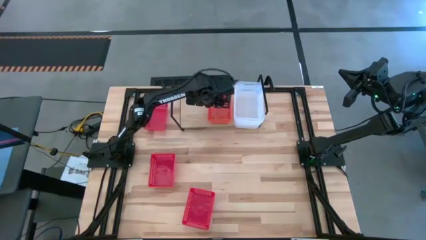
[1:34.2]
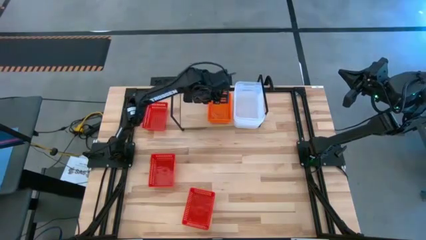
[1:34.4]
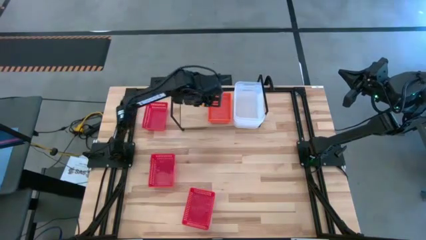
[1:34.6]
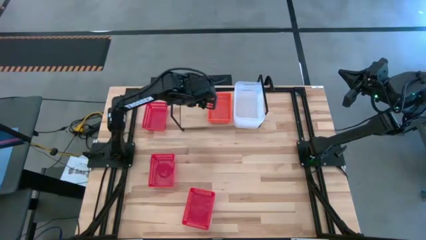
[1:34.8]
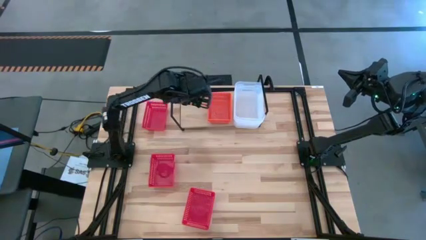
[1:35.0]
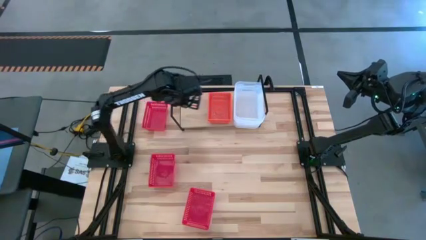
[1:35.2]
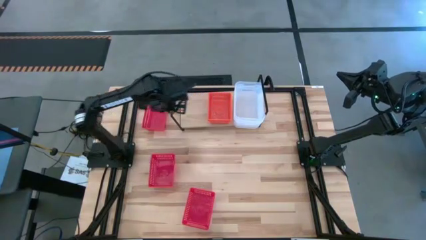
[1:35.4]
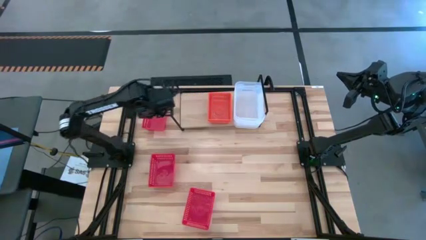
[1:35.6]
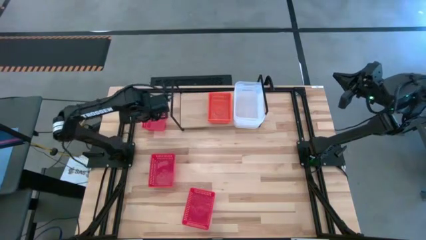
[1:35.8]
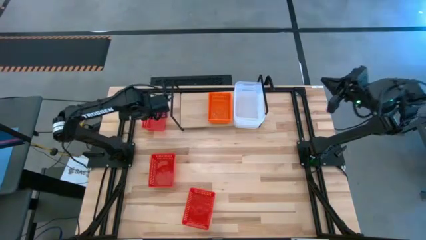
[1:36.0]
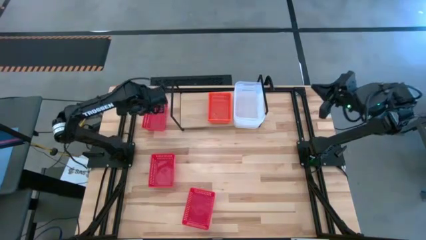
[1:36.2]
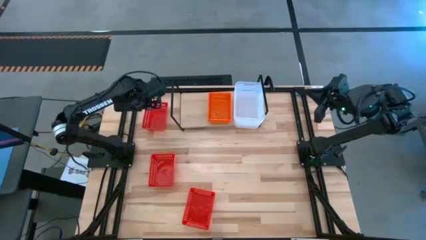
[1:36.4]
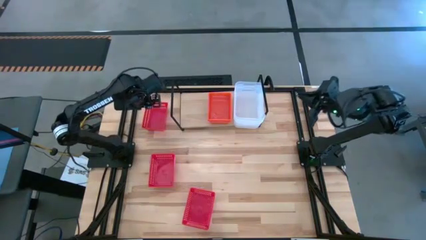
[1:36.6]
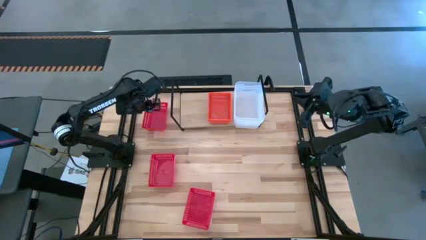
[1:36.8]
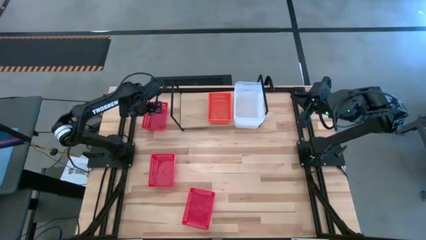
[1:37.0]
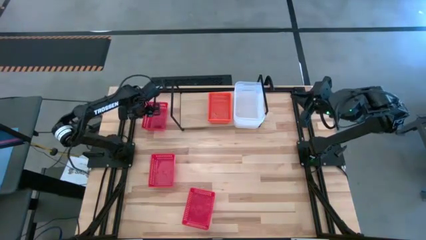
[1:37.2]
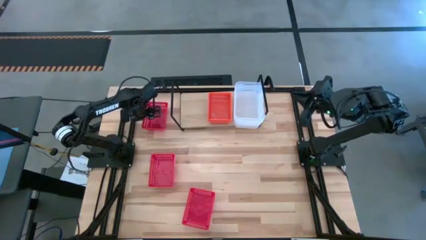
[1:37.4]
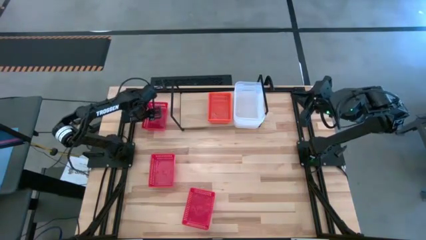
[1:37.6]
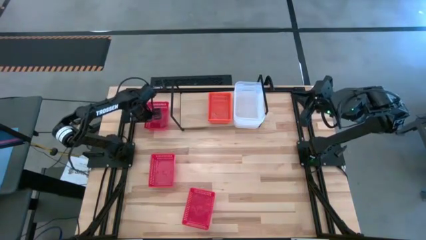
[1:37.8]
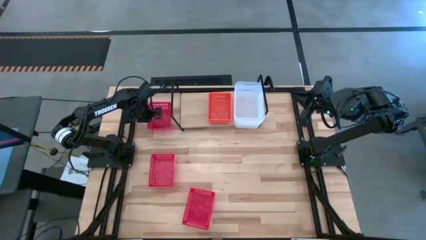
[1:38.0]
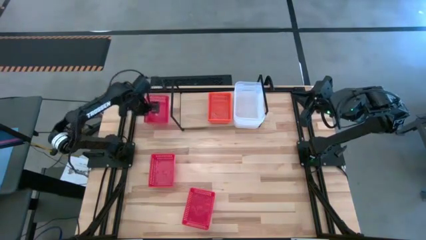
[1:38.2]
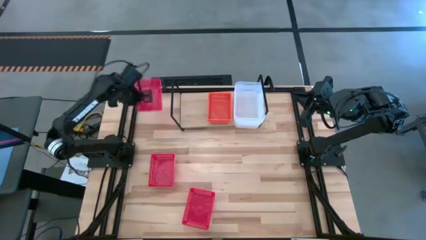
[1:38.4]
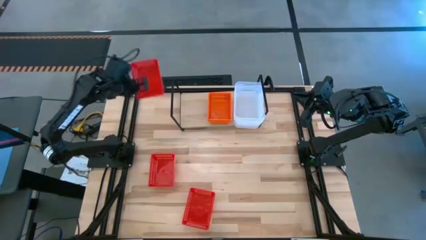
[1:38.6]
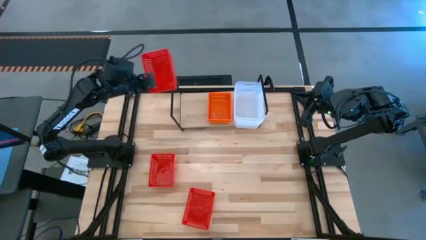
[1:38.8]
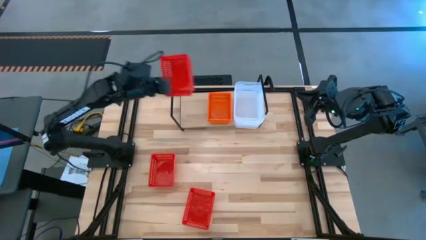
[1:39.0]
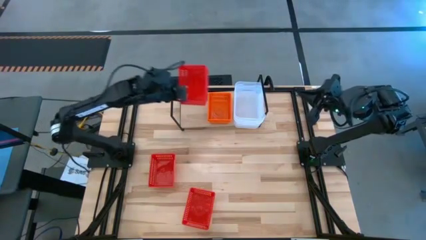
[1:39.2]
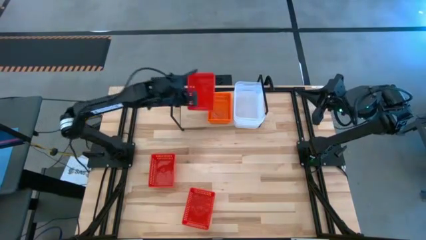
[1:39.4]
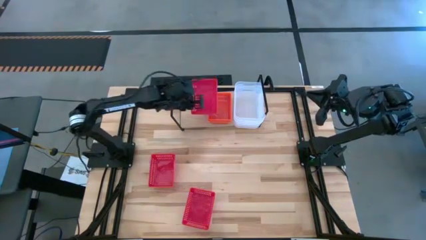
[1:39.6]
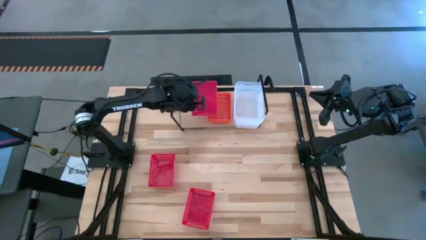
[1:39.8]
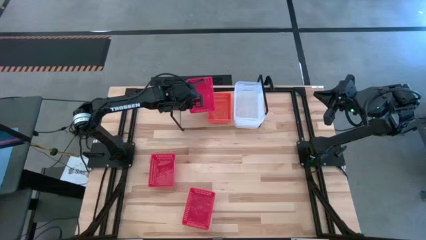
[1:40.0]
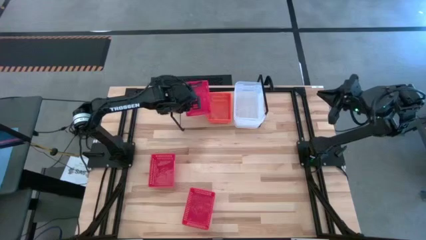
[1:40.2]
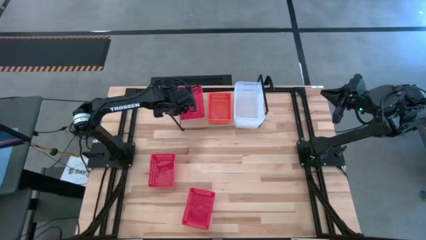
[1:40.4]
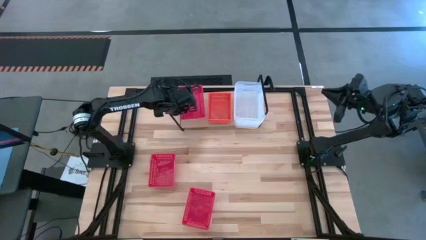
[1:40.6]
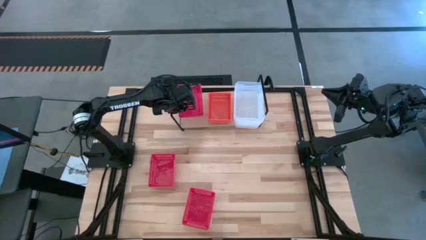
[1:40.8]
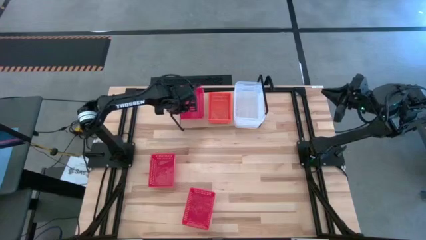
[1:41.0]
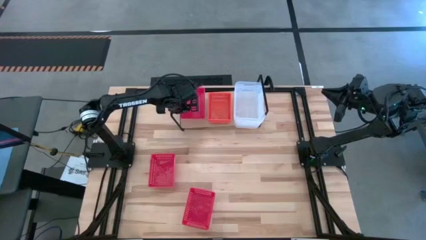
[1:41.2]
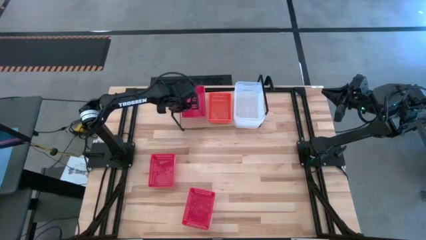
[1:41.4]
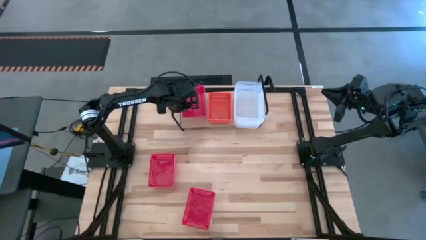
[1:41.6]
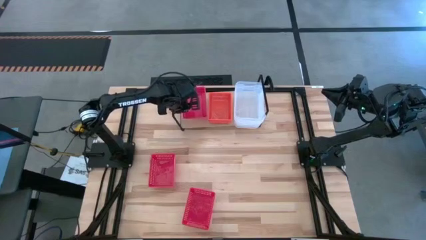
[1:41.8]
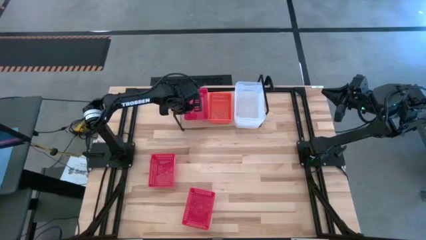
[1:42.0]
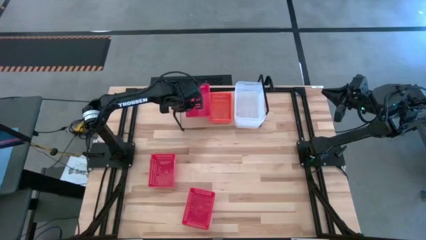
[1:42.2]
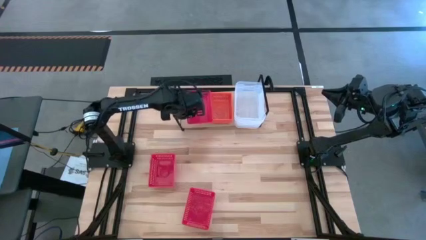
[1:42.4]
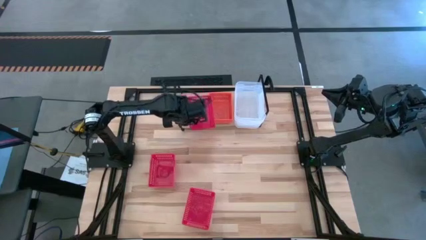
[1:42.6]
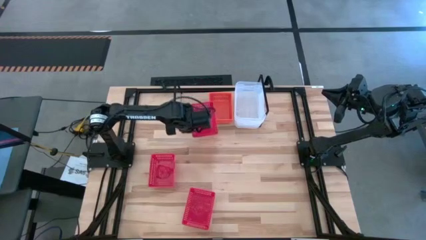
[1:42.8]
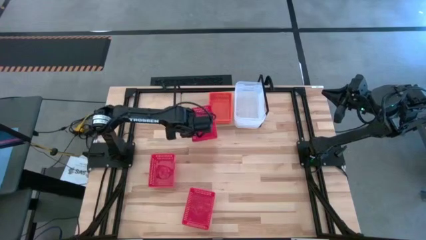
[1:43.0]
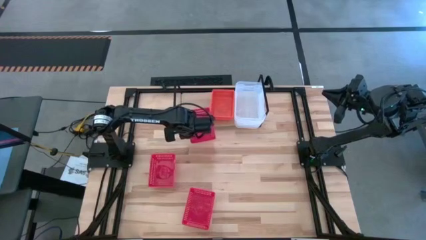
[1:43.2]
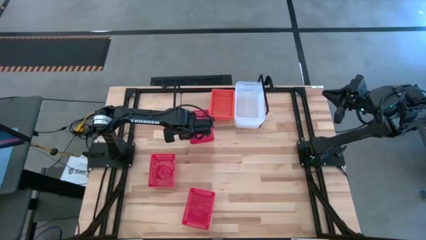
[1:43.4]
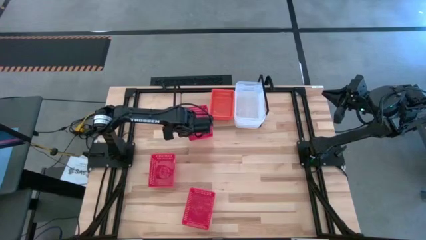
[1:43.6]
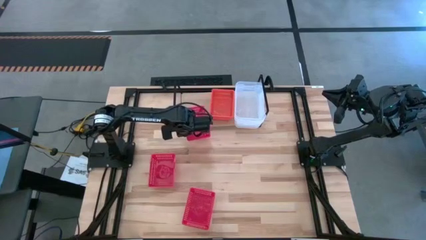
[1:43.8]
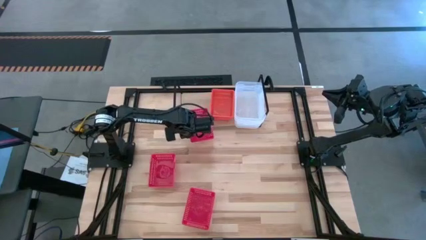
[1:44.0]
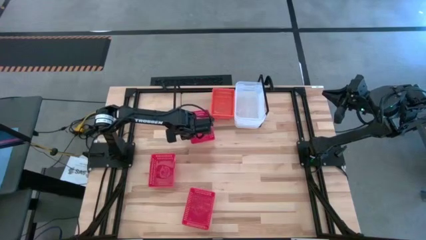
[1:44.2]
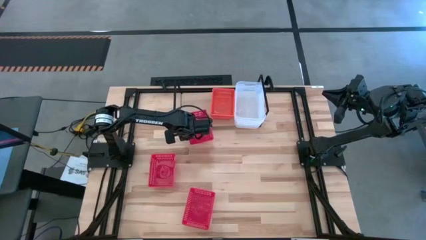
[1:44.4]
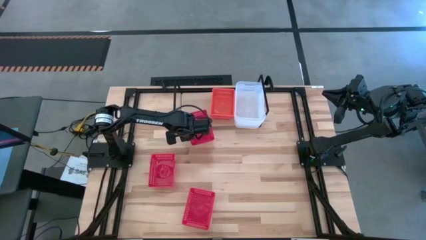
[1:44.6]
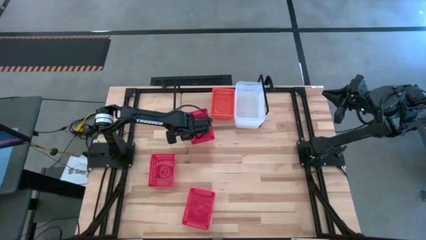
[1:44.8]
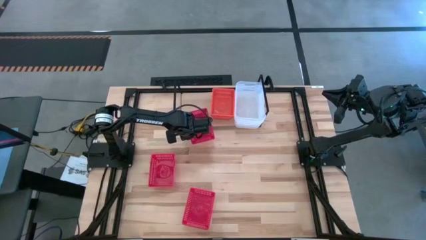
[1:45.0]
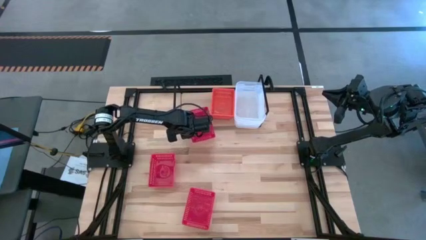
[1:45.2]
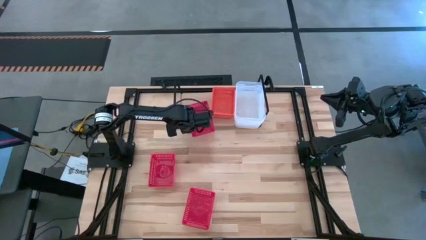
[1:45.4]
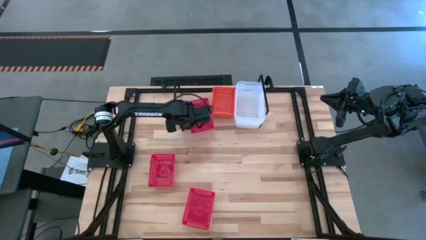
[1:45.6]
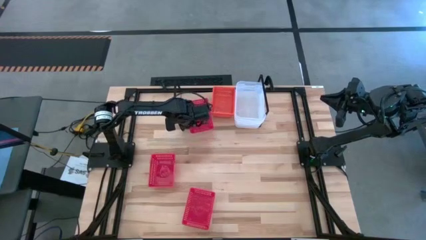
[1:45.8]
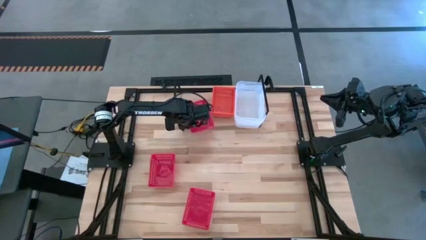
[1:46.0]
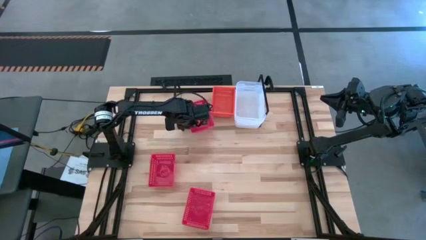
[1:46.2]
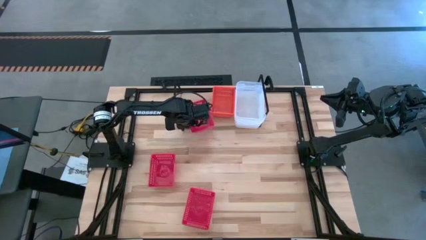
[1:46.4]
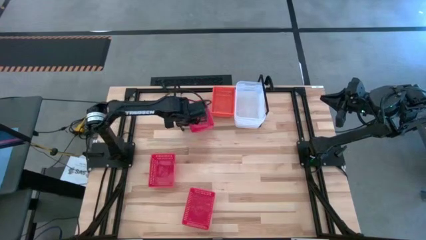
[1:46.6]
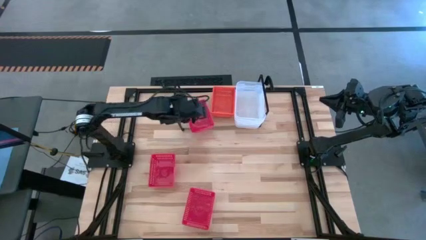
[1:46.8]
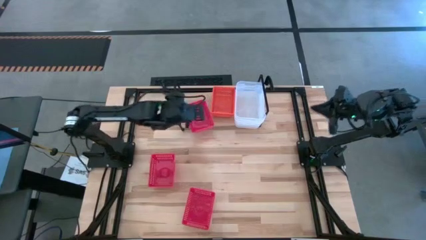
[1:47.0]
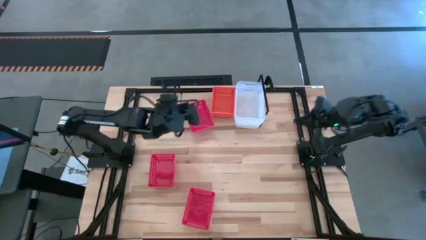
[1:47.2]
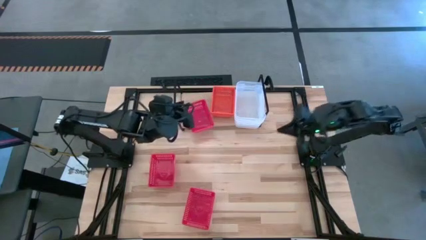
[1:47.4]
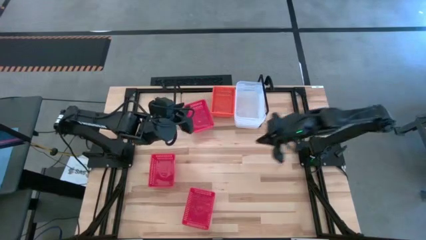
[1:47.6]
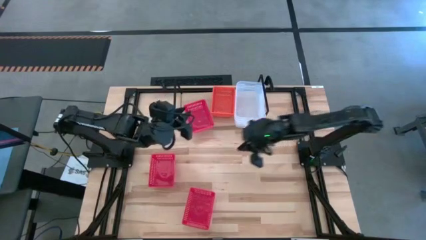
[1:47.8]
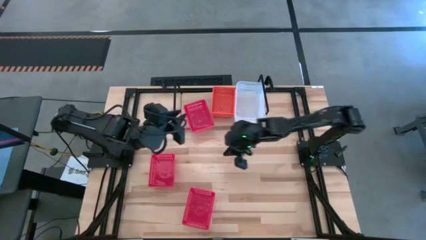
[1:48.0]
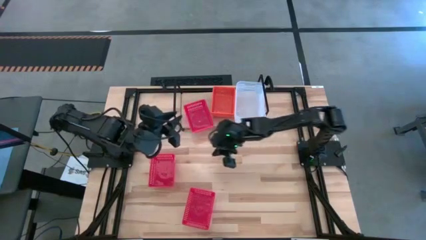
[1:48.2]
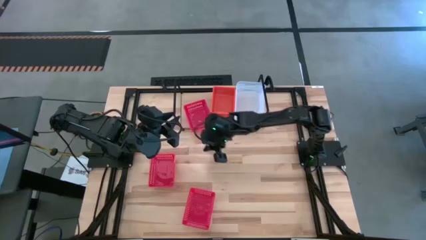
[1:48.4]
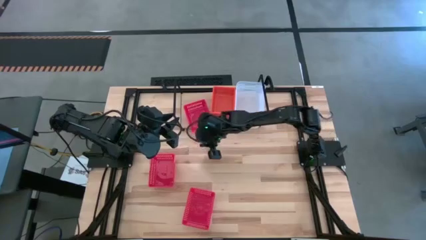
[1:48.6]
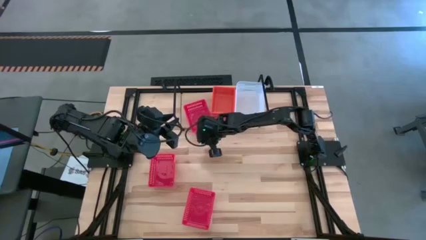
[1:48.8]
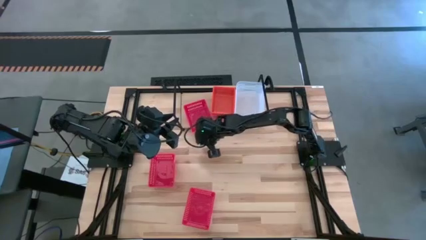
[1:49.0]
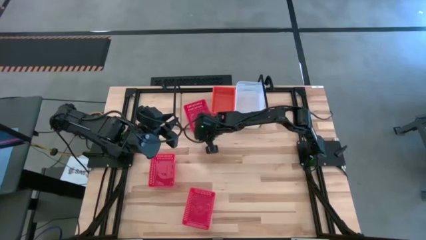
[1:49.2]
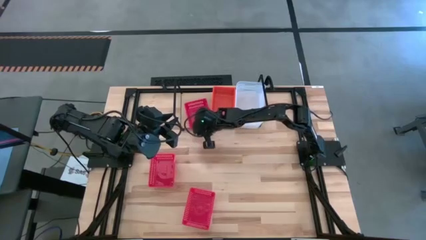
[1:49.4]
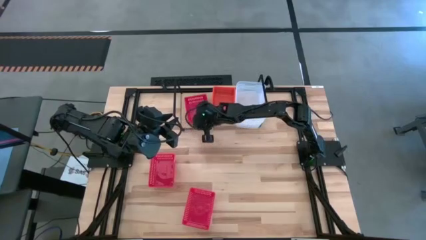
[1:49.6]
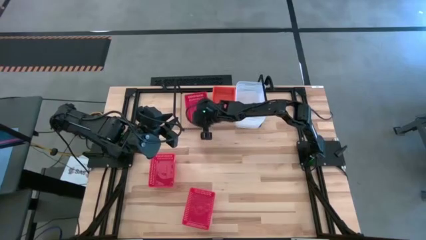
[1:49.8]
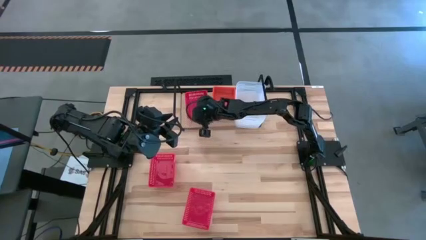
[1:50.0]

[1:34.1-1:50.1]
Task: Stack baskets on shelf by color
Put the top red bin on the shelf
